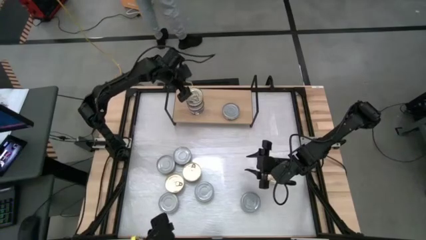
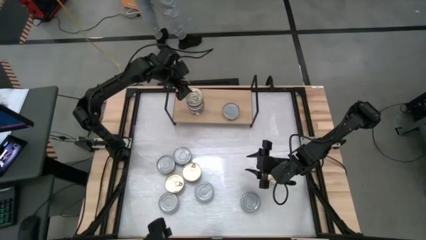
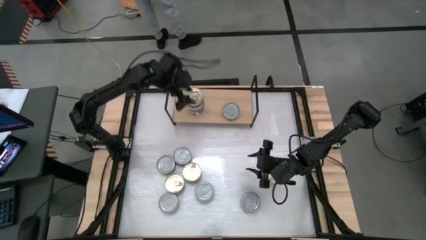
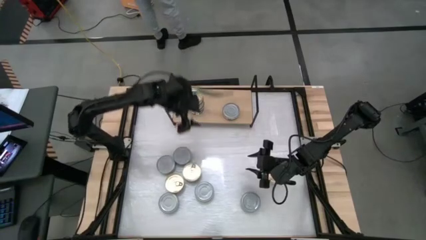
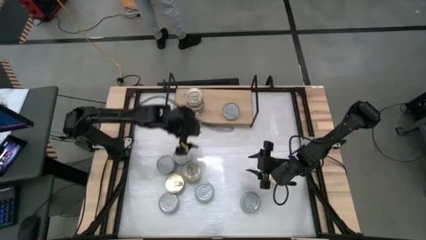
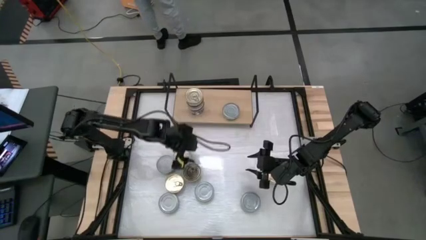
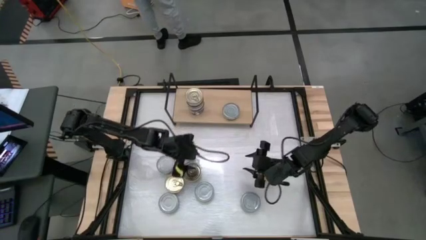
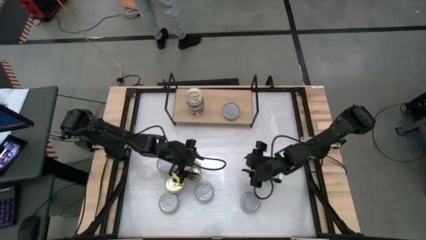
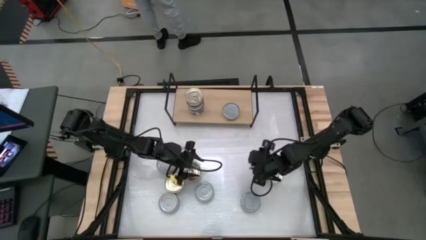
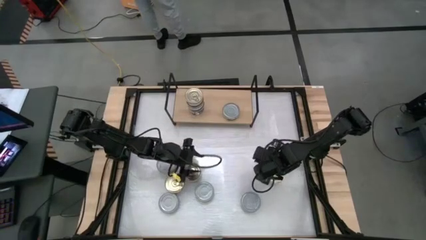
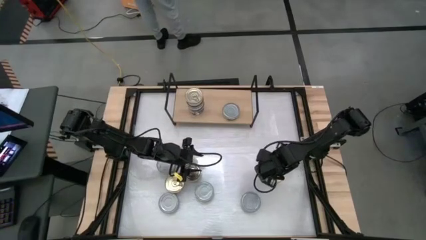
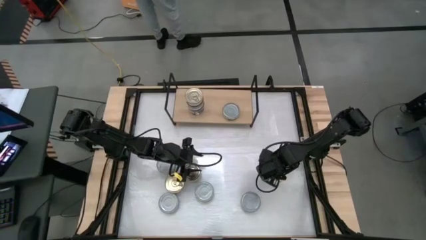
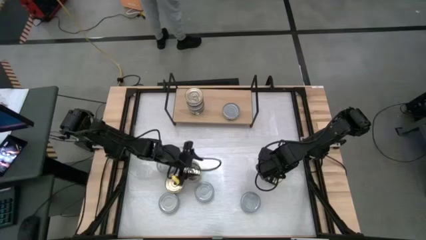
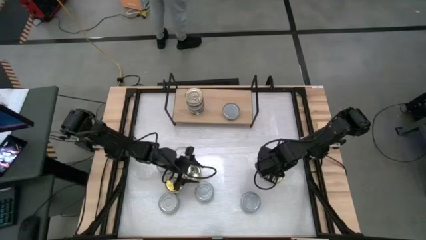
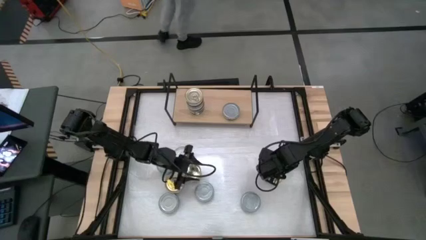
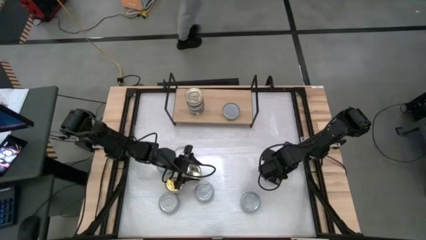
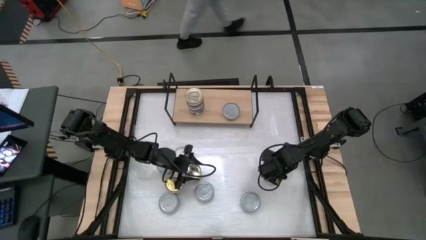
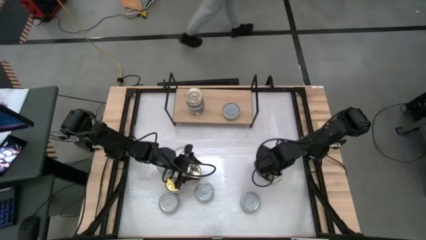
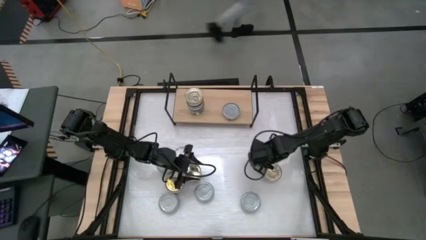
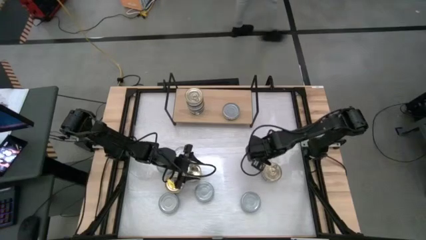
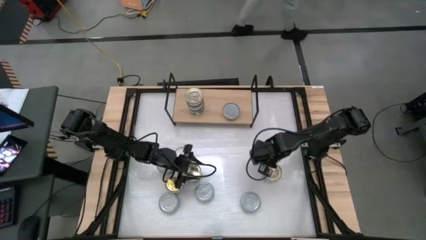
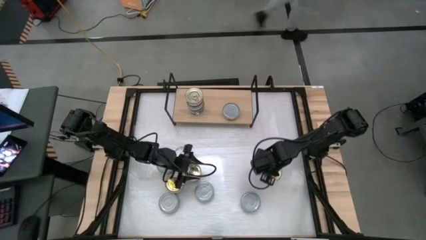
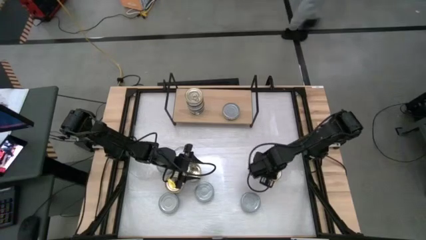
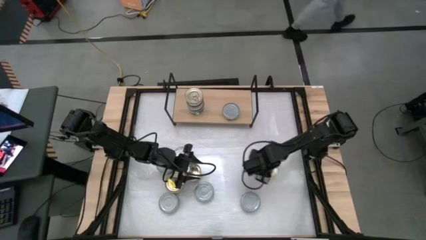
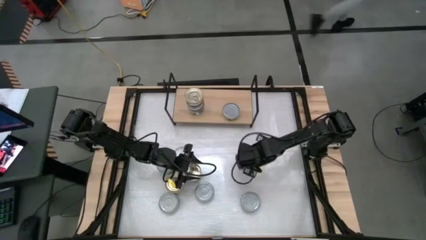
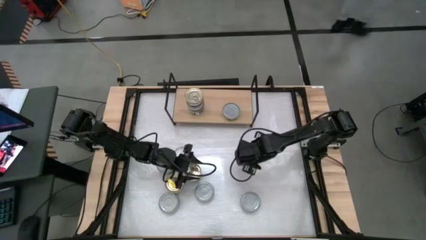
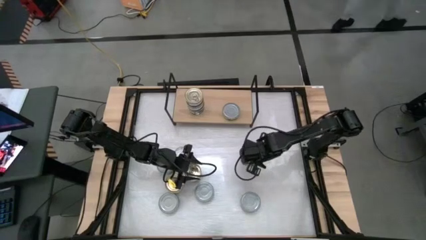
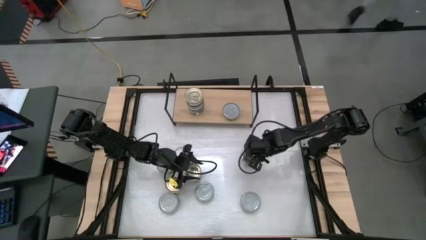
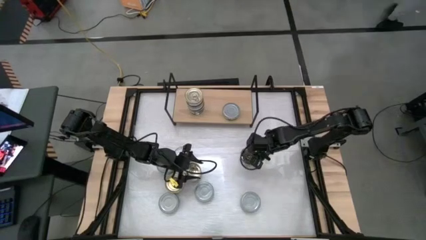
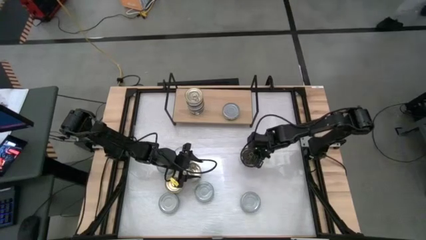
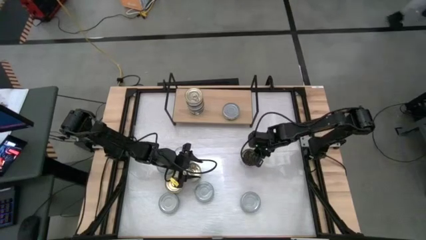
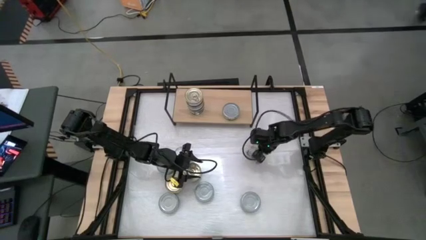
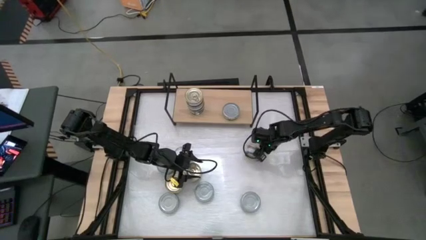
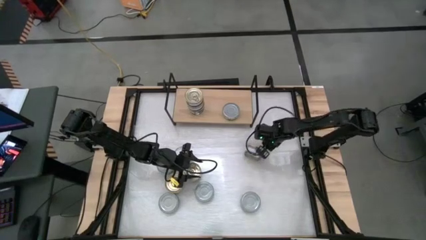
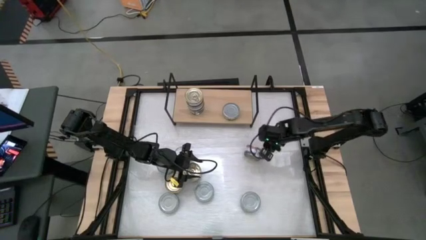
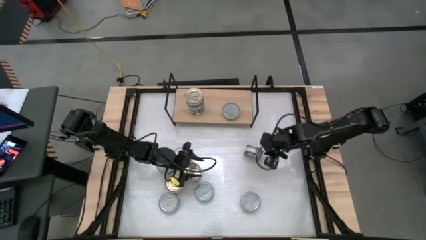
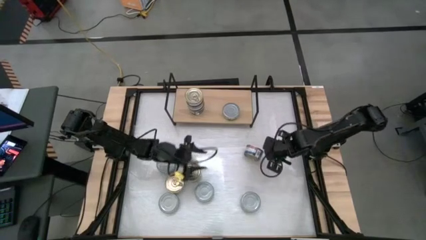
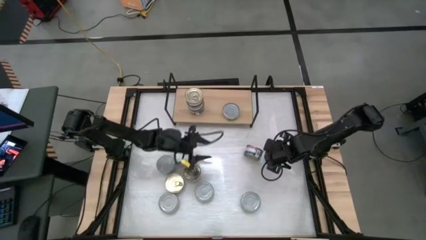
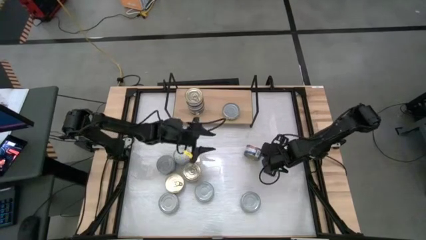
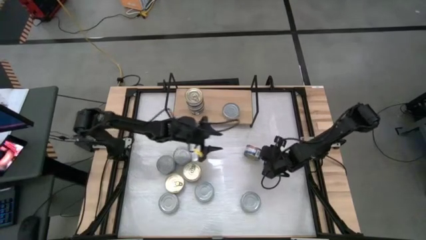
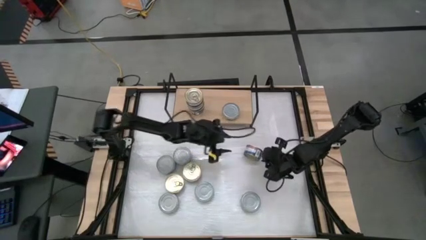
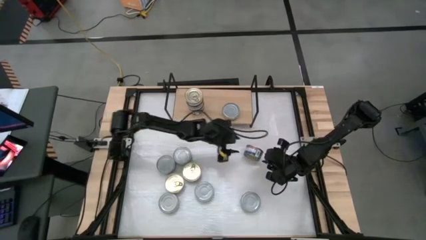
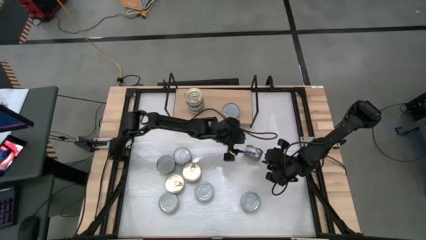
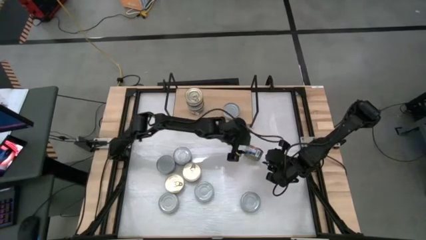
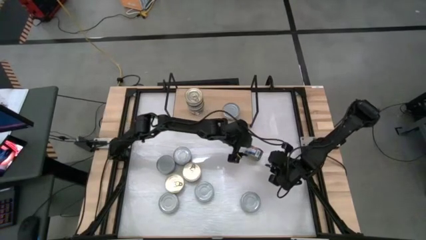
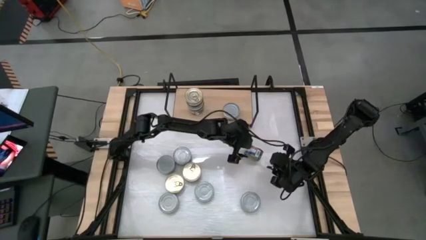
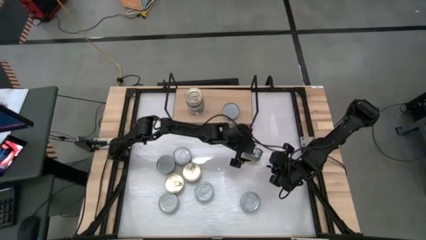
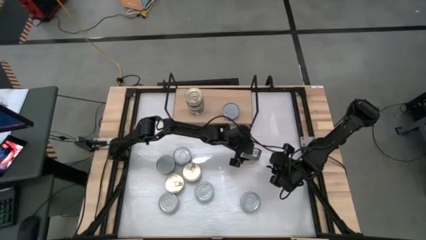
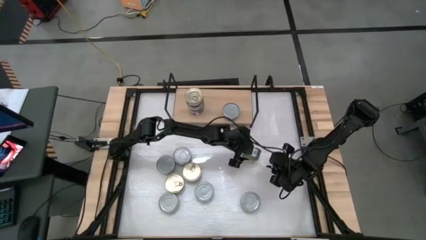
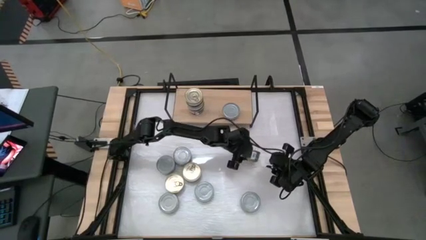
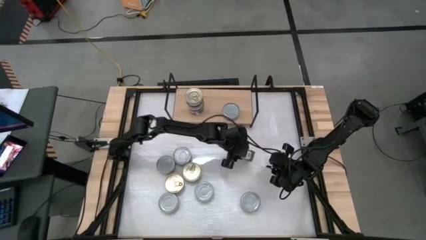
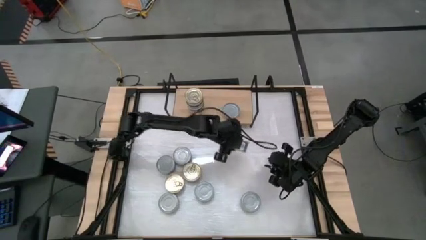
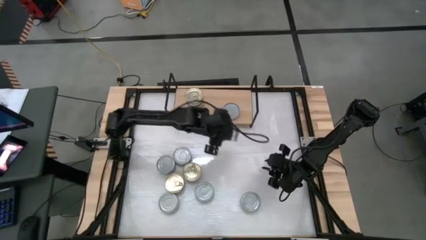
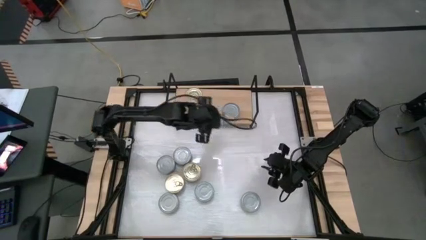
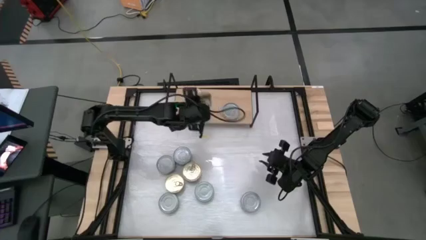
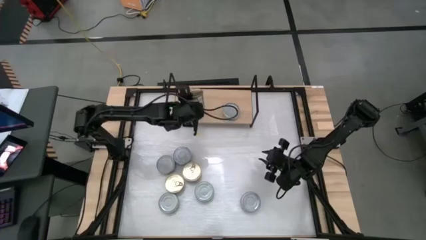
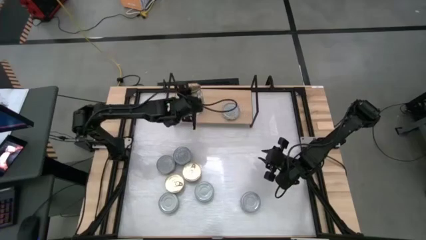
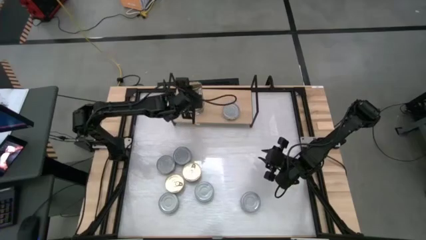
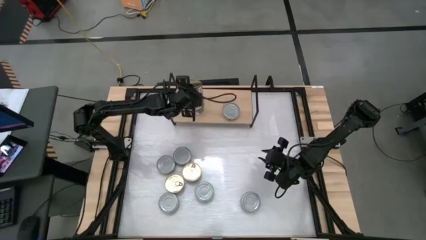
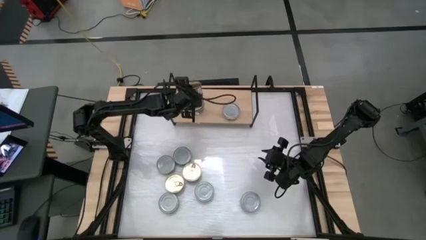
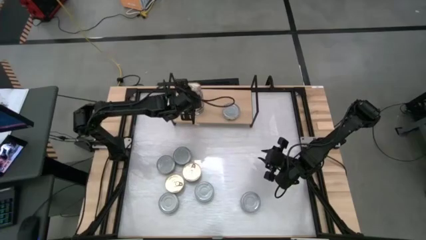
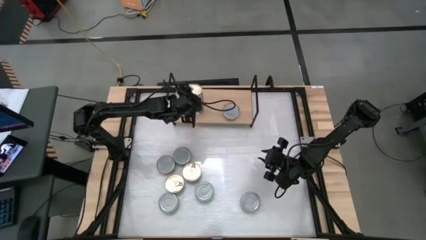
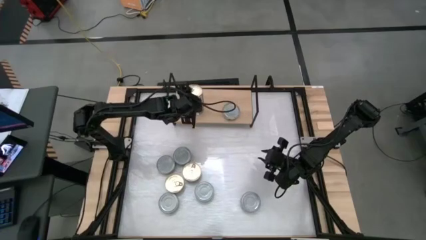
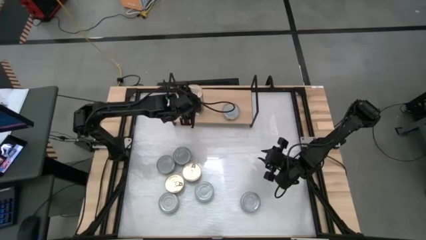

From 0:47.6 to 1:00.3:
Task: Stack canned seafood by type on shelf
Stack the blue-pink tuna can on top of the other blue-pink tuna can on the shelf
